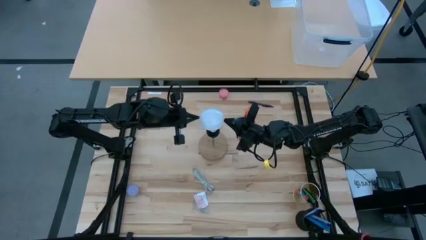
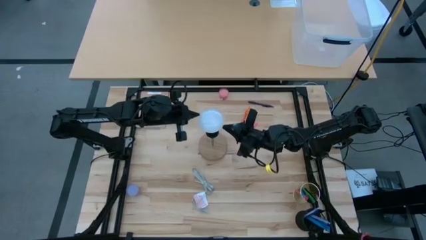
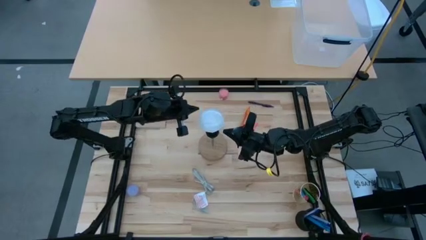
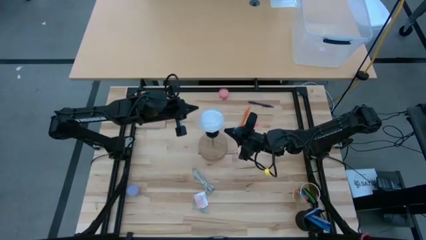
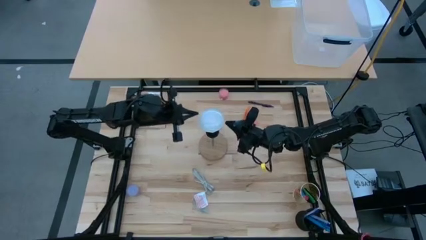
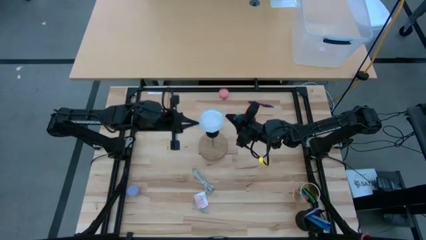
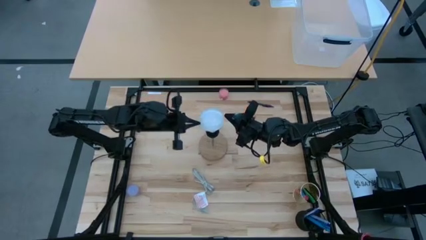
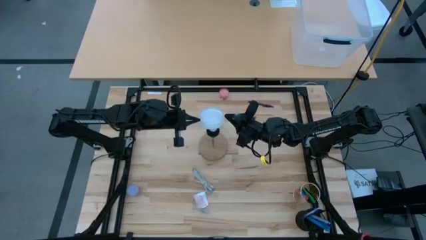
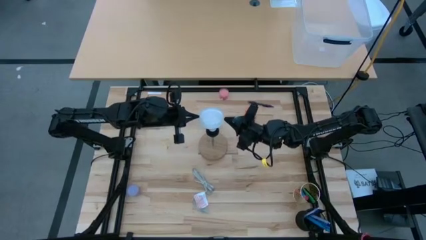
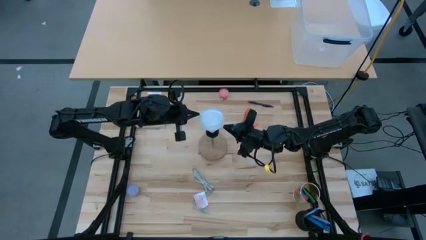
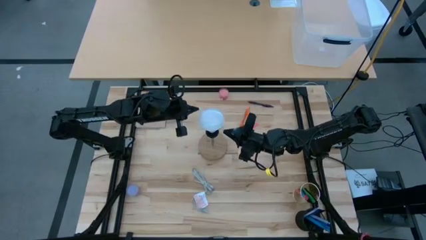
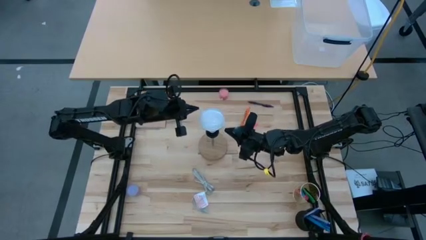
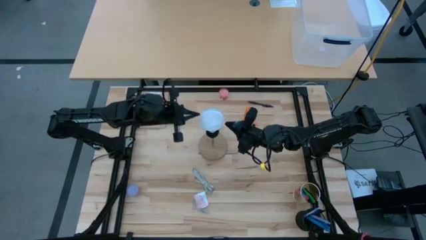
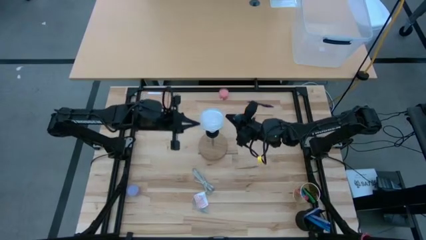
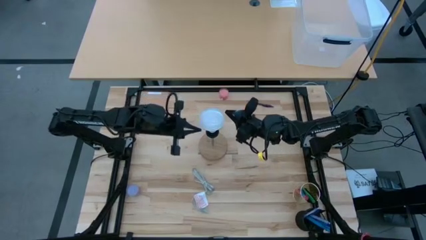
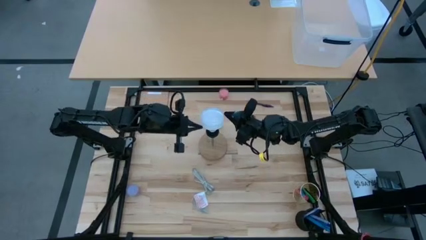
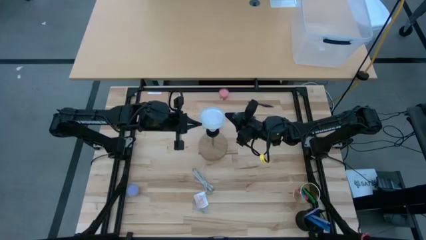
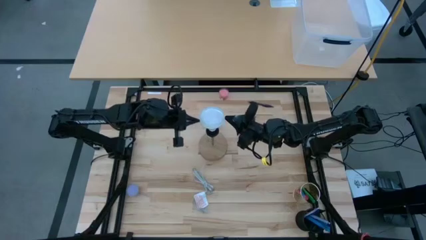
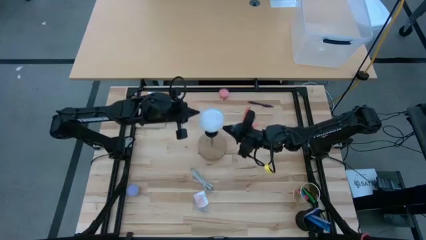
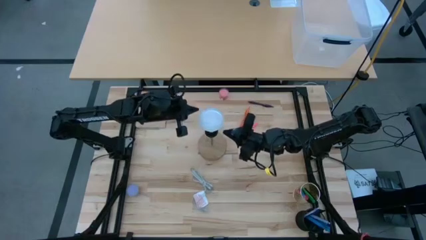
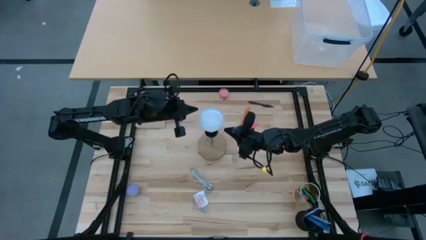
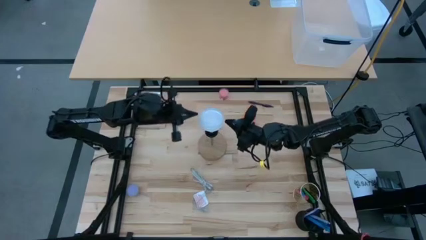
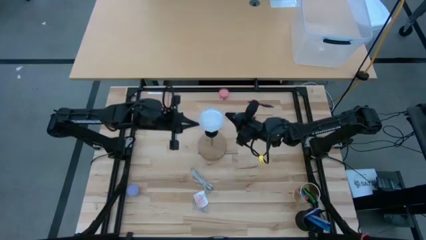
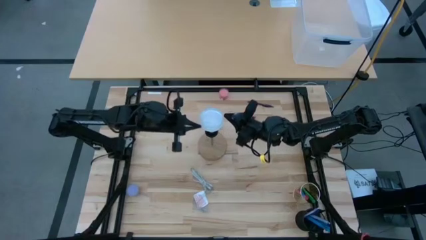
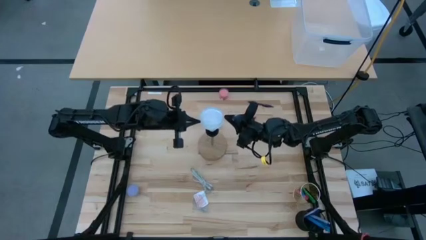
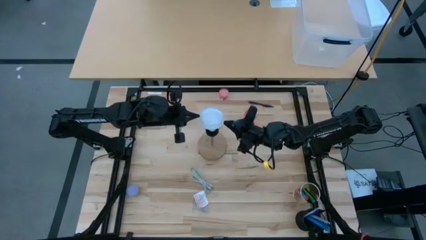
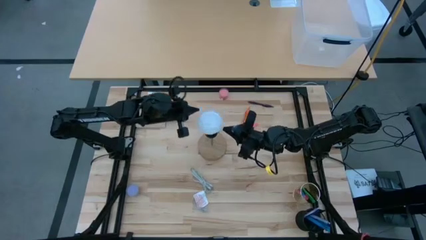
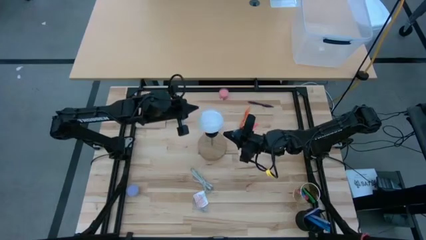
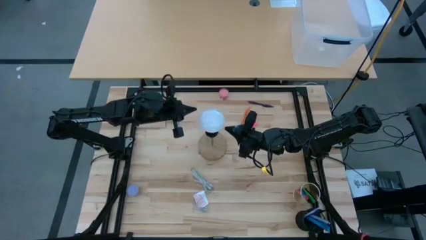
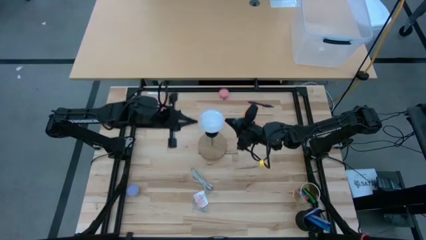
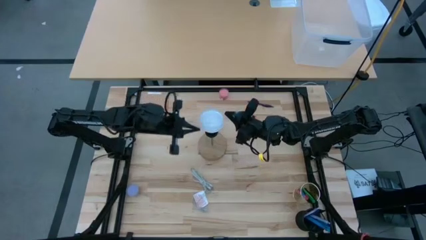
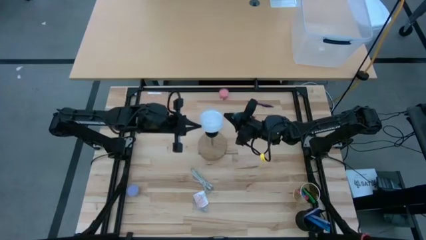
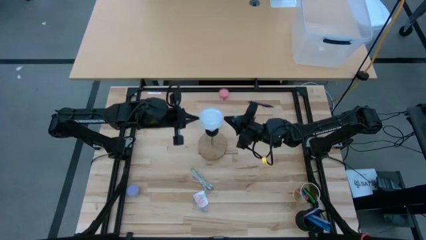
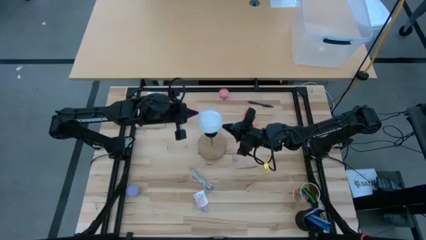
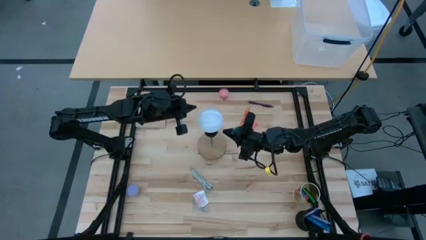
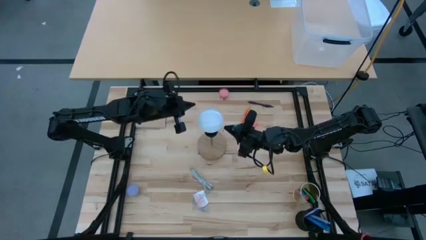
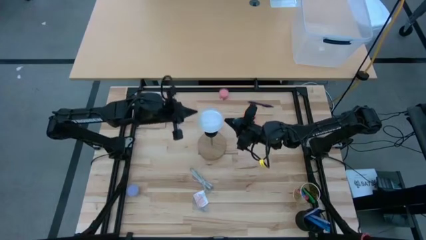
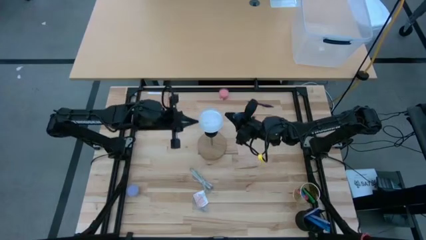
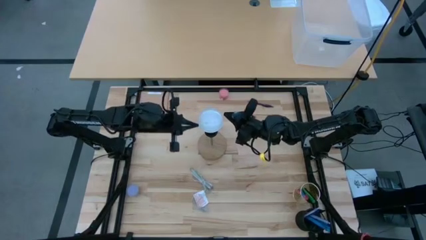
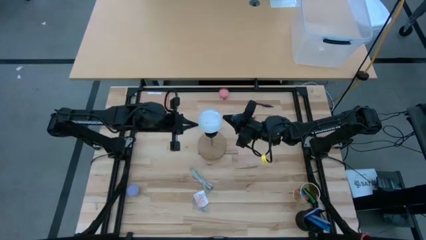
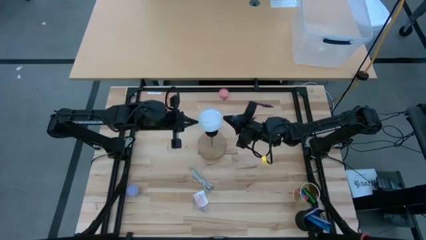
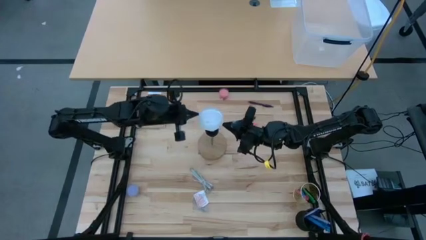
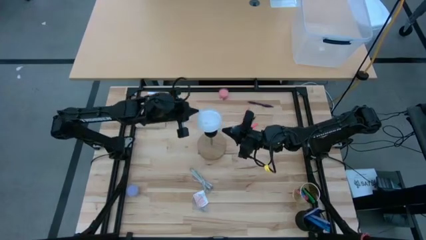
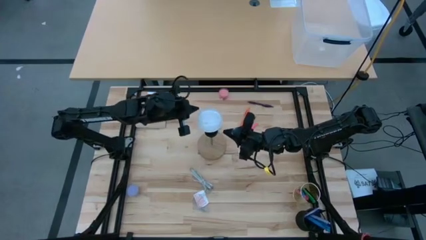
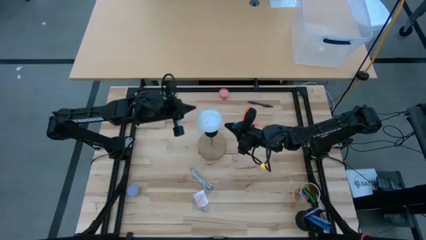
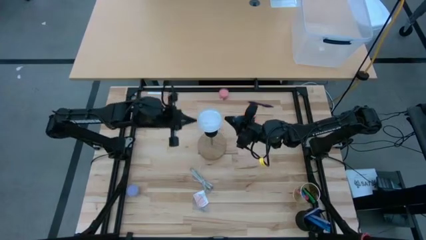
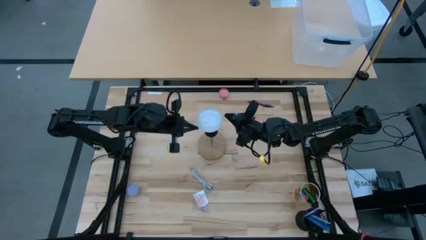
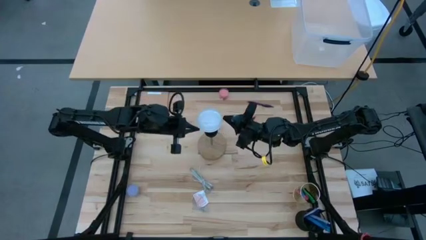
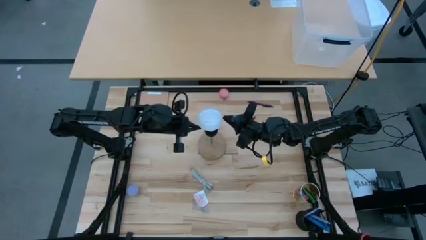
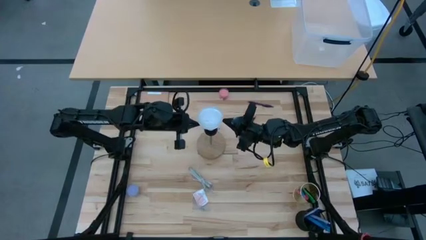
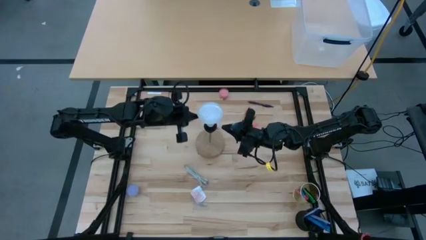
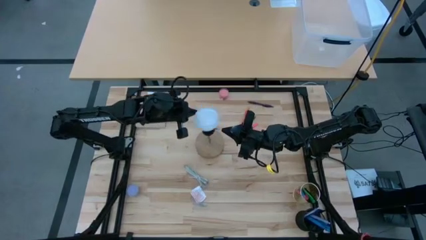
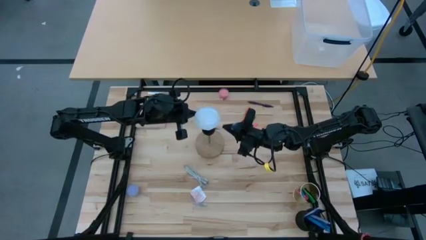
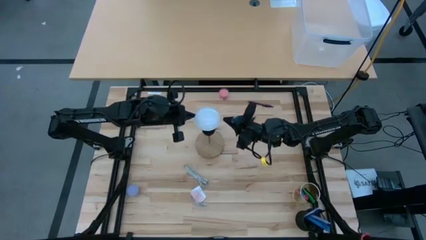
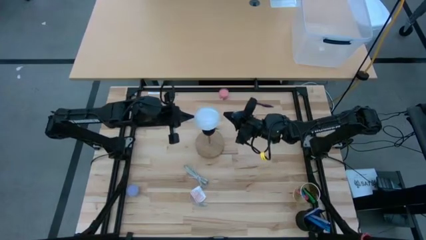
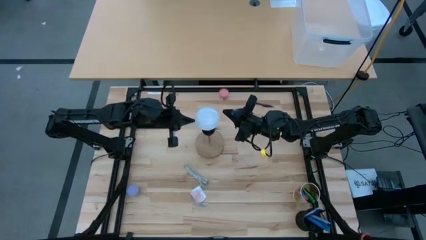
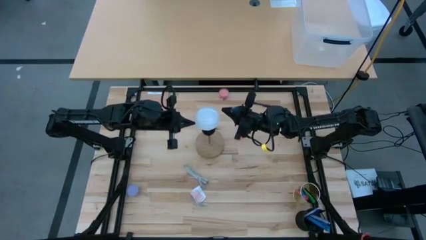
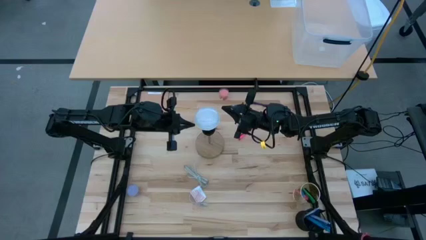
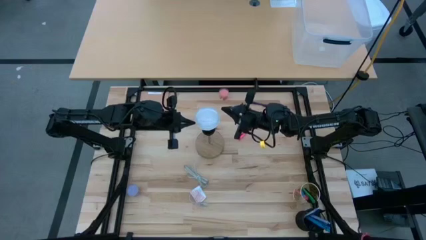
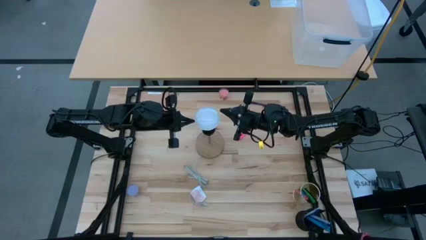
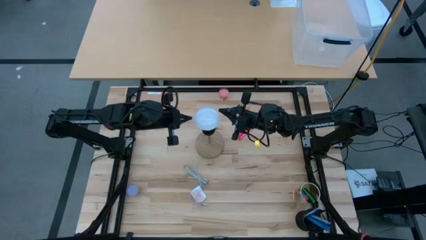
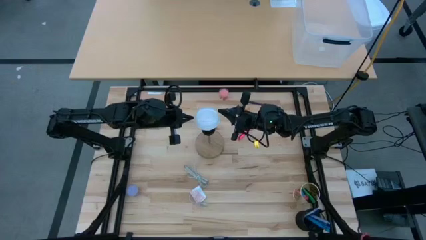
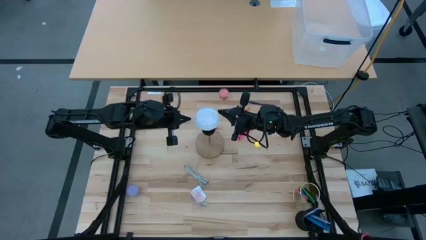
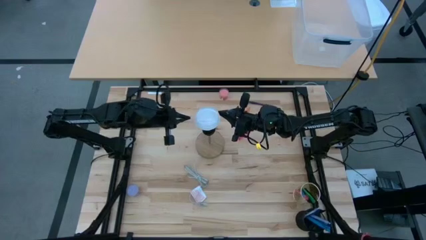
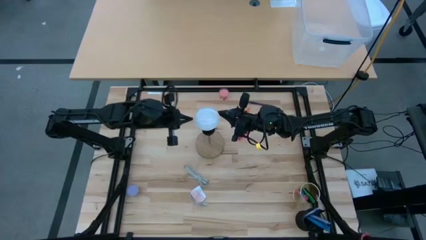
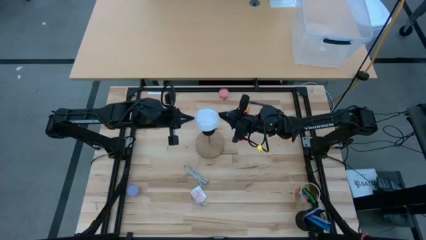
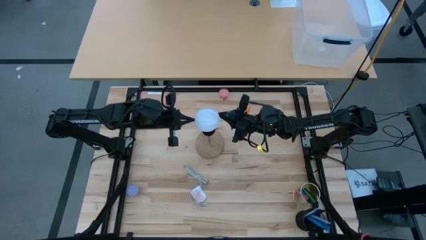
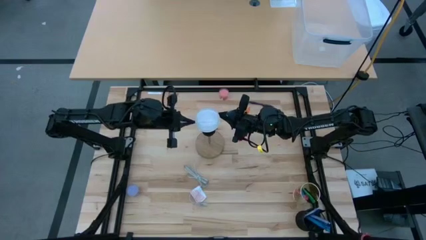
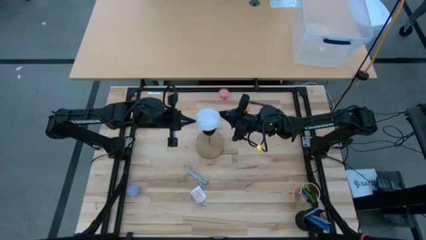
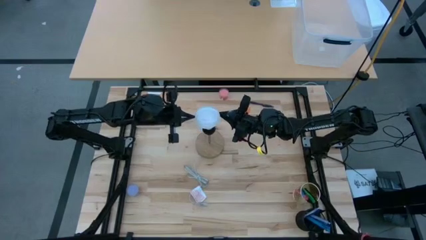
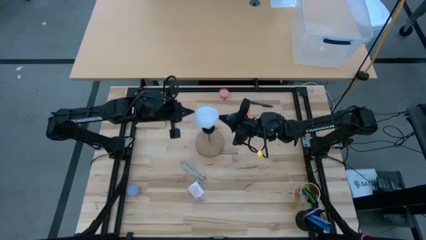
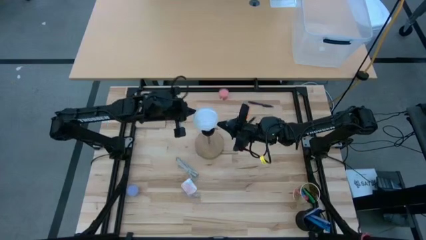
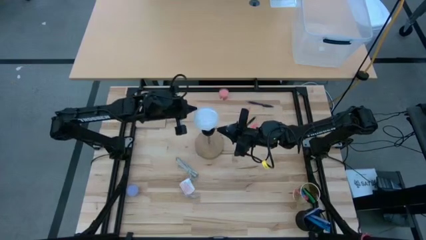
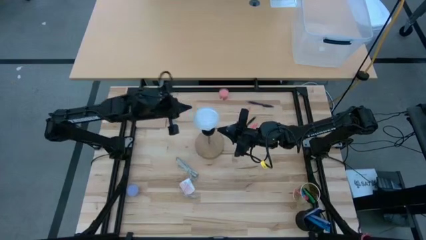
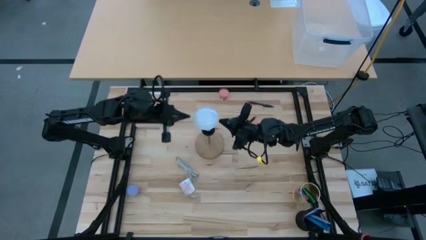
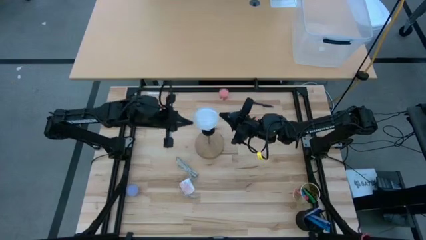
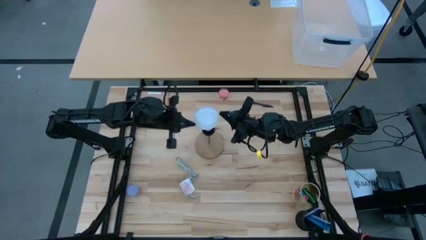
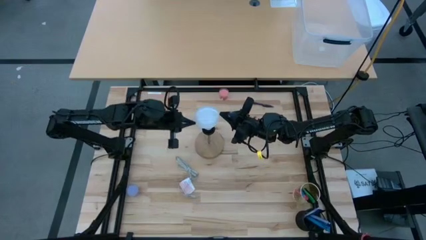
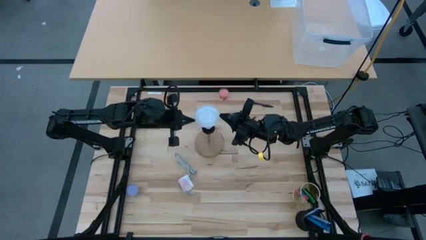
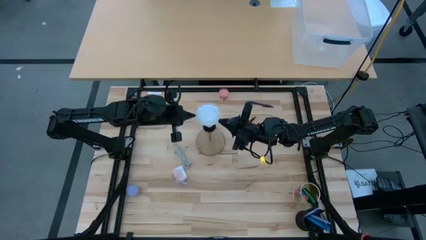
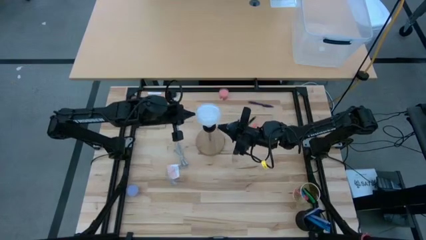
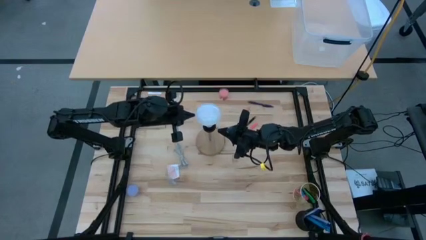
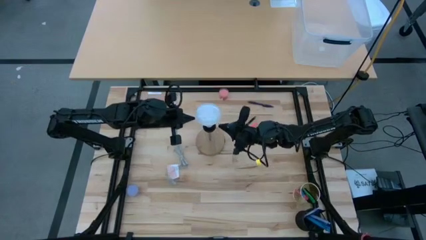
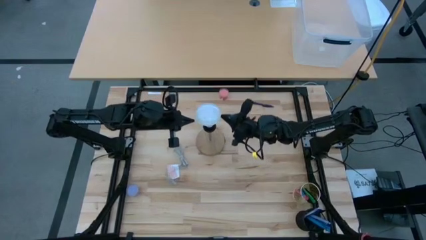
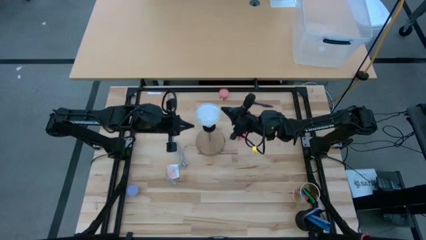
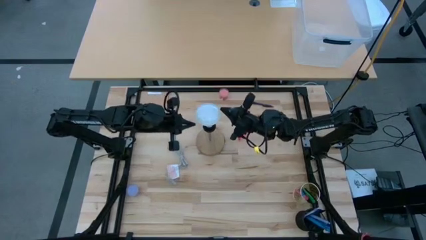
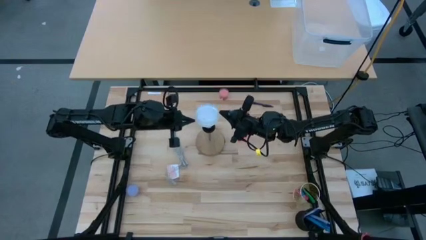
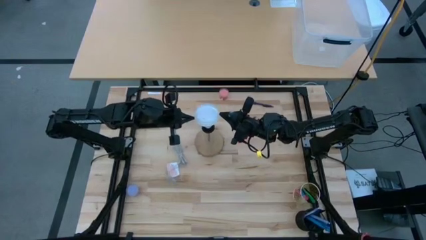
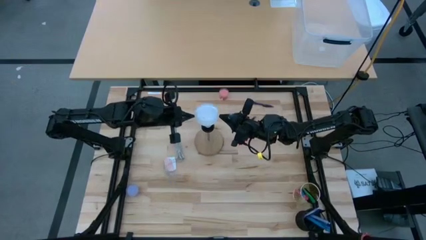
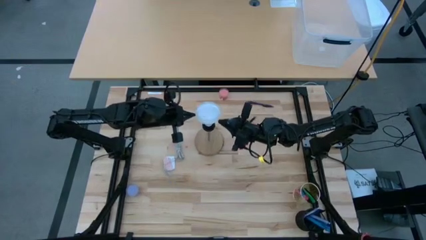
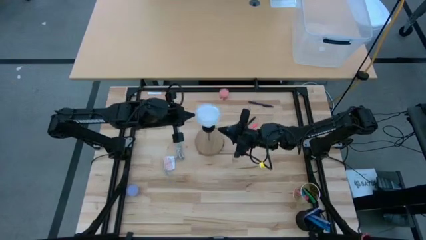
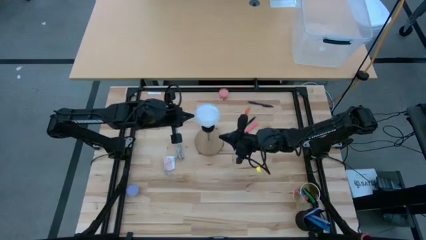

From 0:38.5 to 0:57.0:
Task: Screw lightbulb
Insert the white lightbulb into the desk lamp
